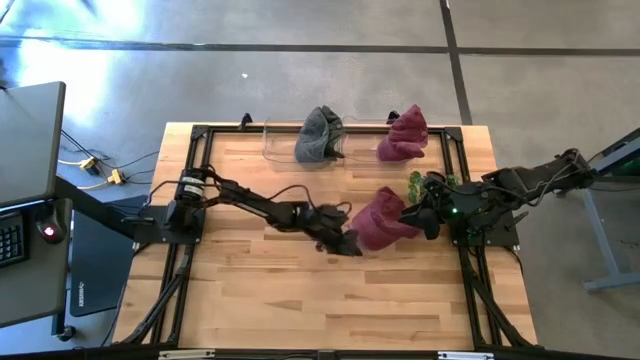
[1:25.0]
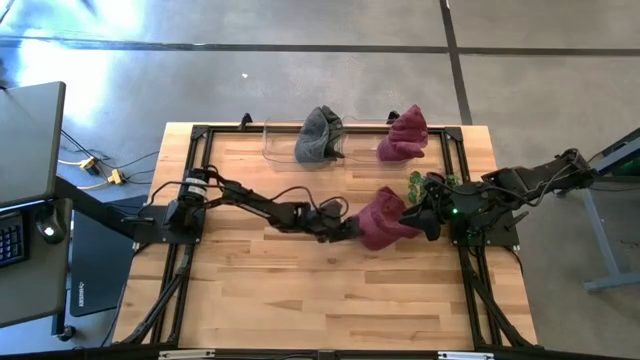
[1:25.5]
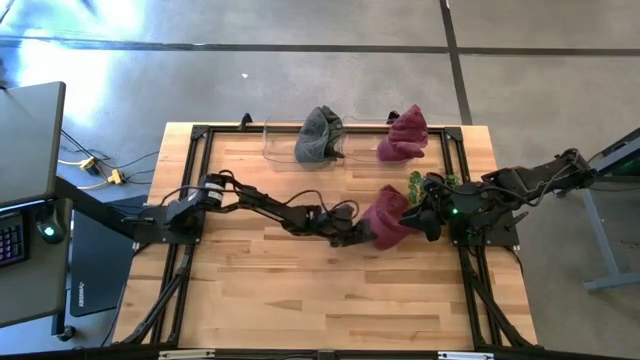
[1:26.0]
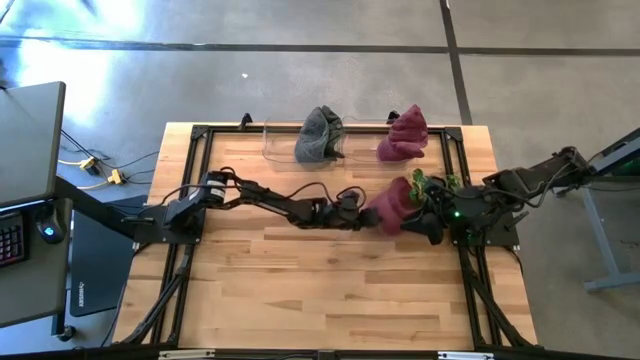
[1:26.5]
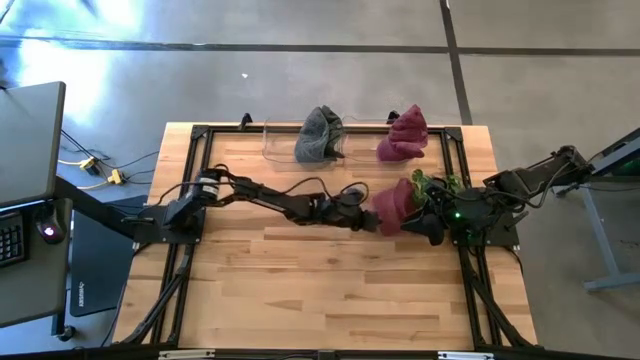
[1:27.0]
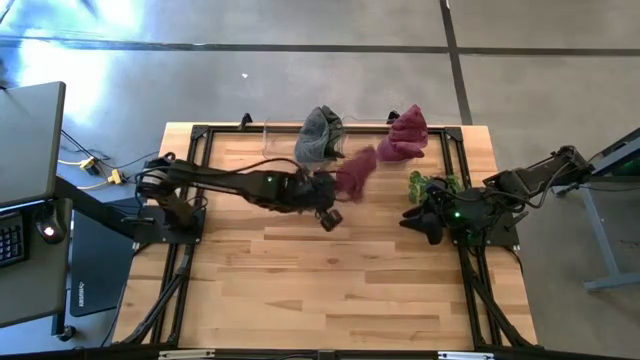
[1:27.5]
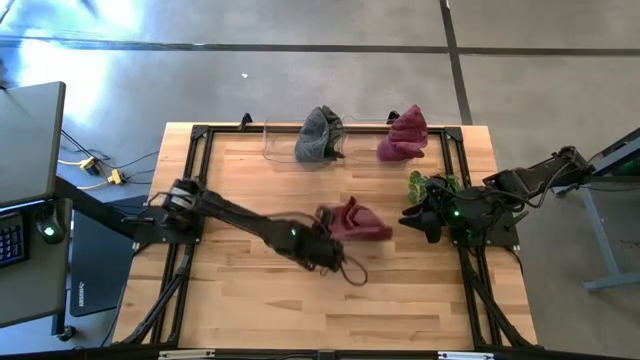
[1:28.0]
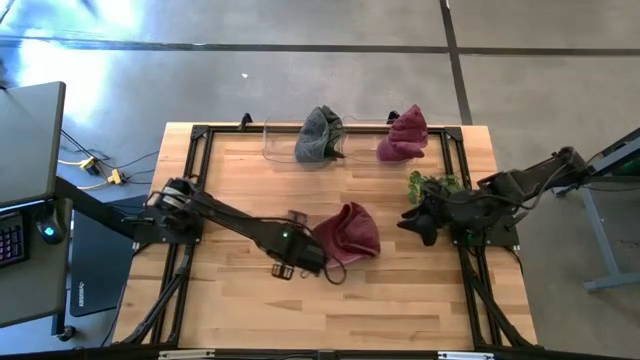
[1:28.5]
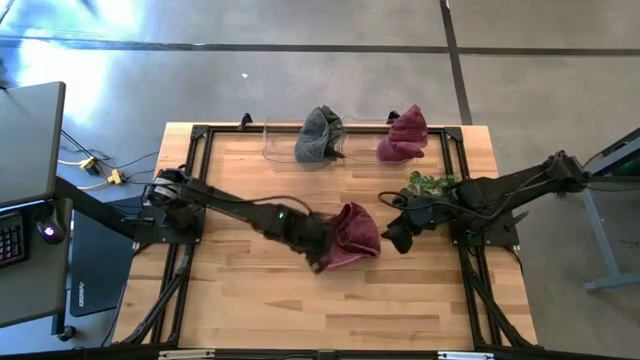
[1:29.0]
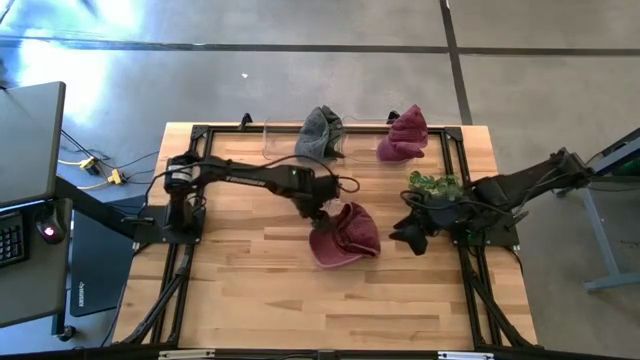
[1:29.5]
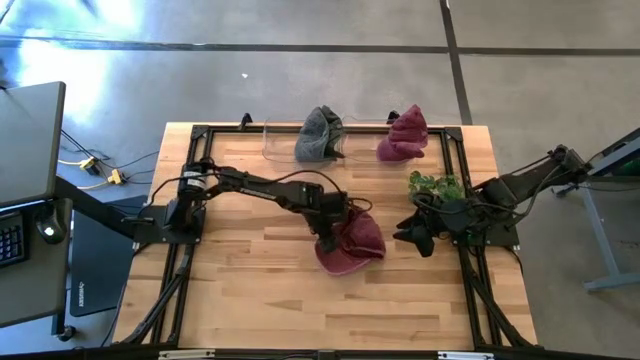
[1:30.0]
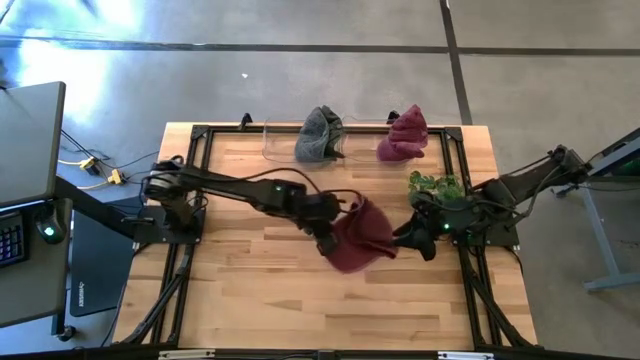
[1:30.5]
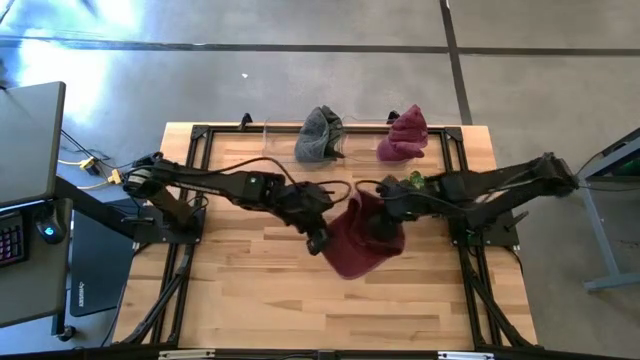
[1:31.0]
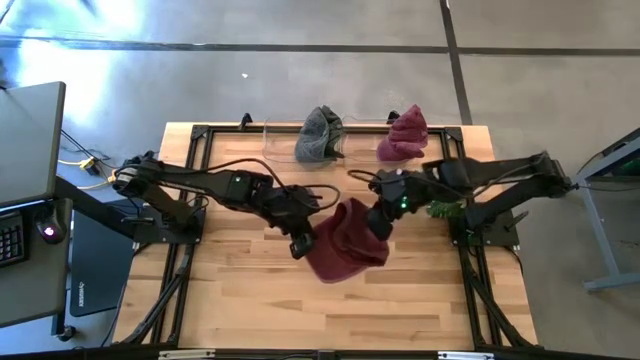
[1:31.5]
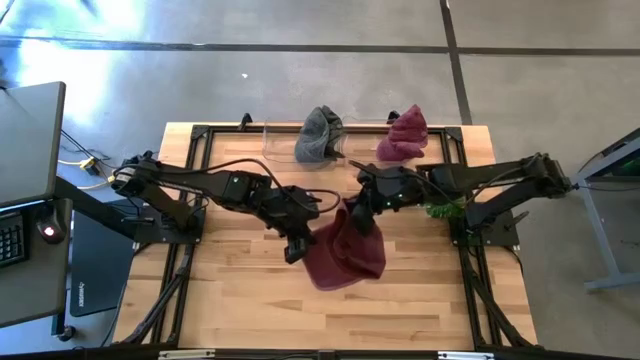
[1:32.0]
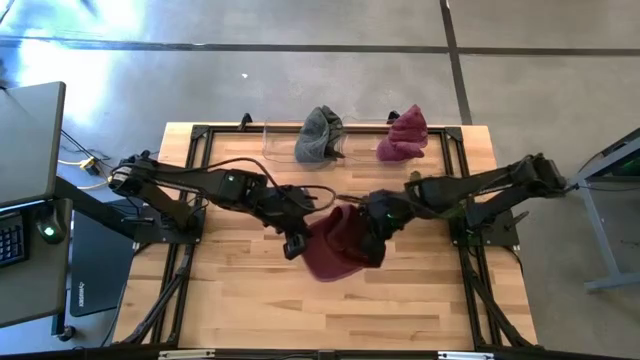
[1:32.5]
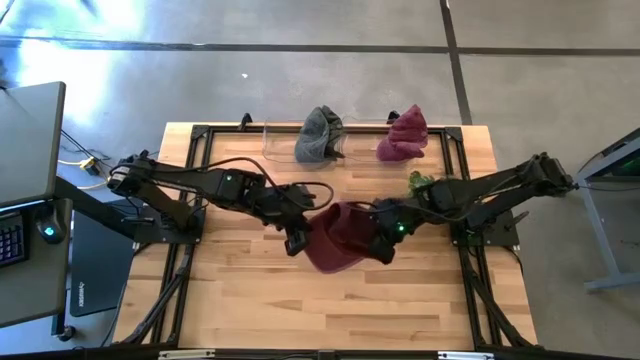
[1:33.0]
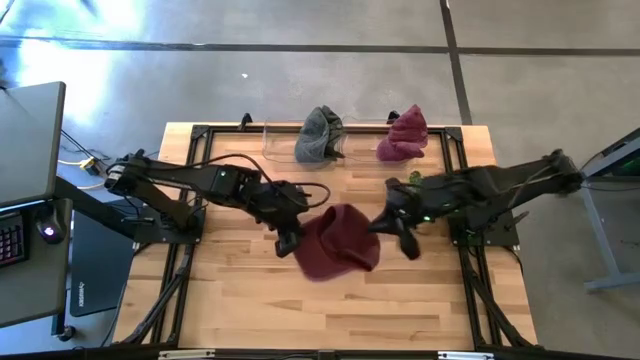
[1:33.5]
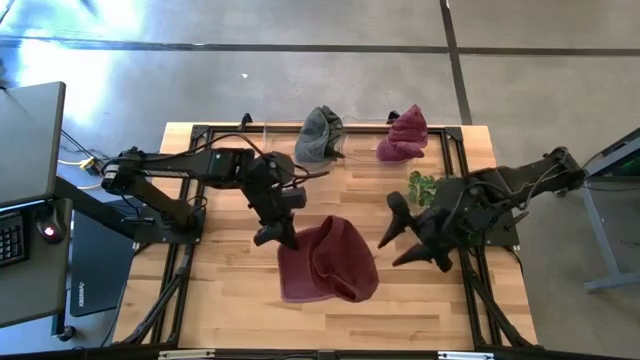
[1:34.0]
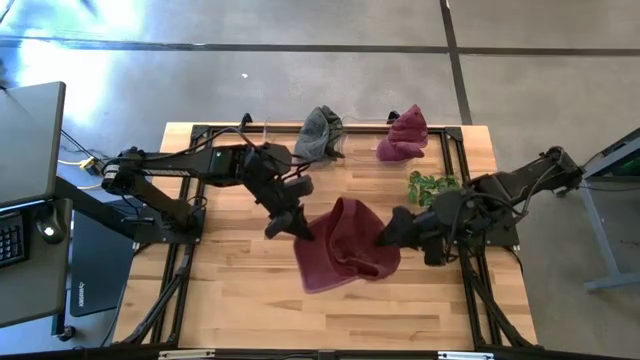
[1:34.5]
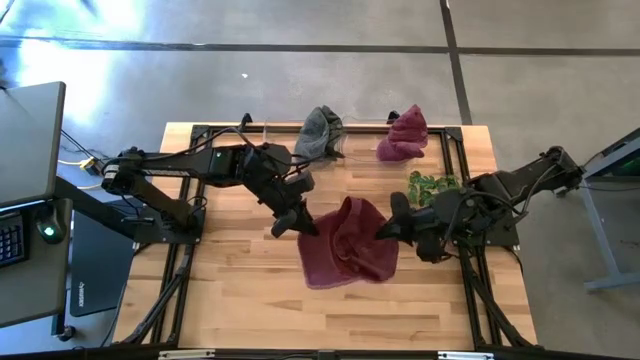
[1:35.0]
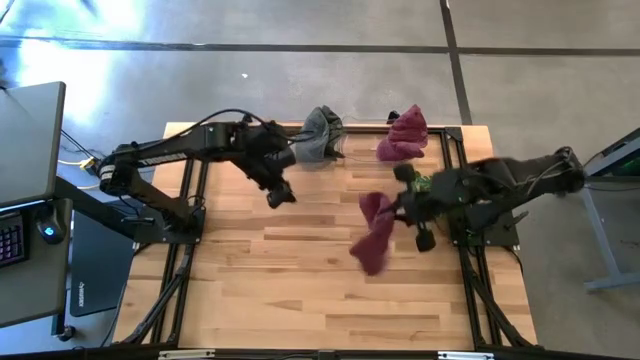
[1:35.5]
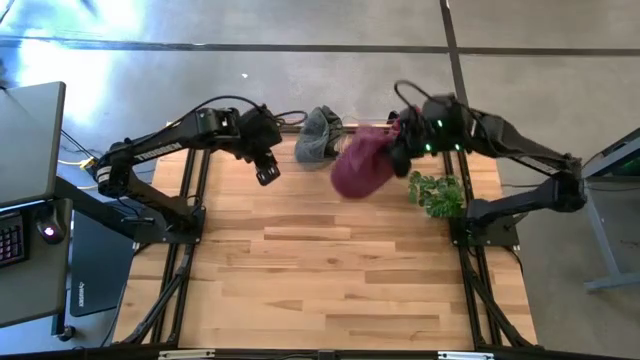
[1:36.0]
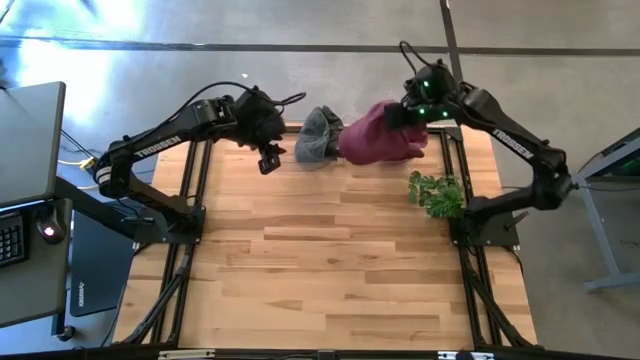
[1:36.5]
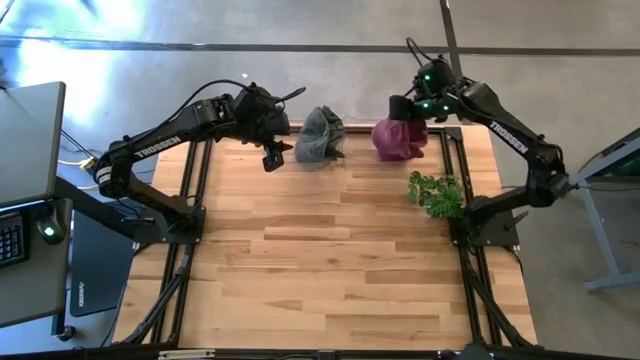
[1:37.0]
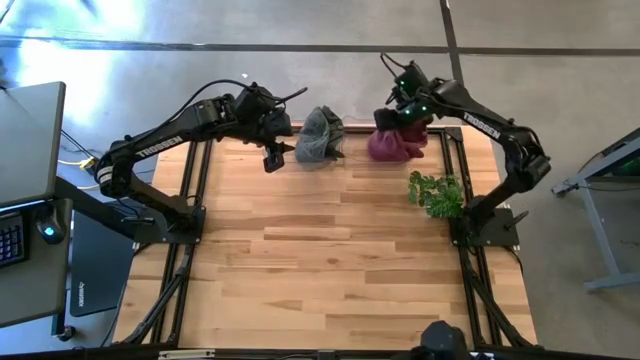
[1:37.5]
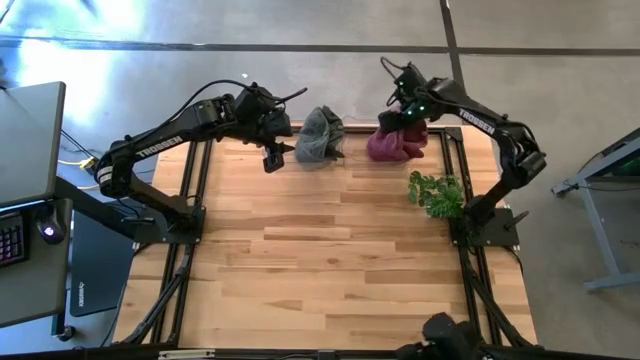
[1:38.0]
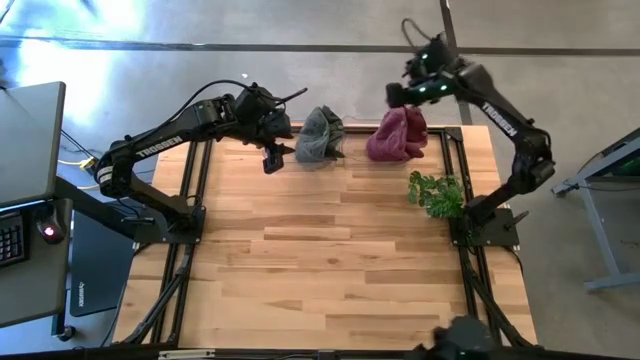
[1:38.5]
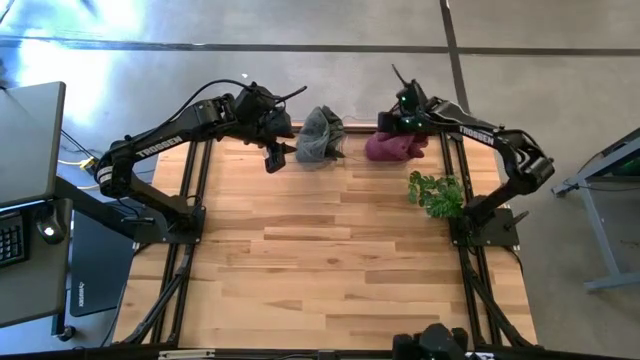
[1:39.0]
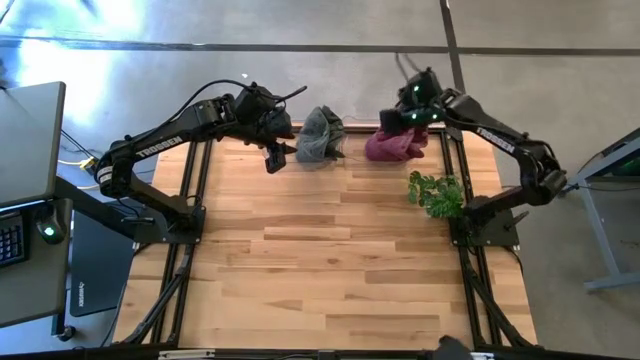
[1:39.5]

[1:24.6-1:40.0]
Task: Pick & Place hat
Put the red cap into the right transparent bin

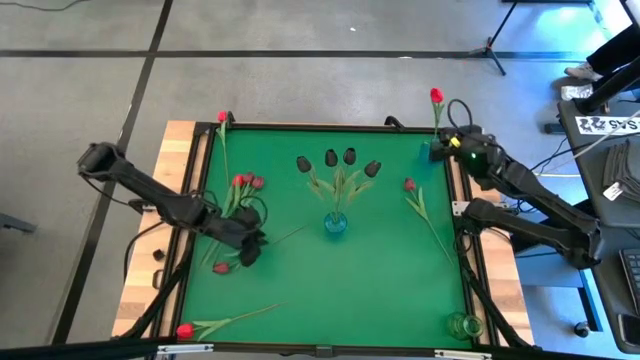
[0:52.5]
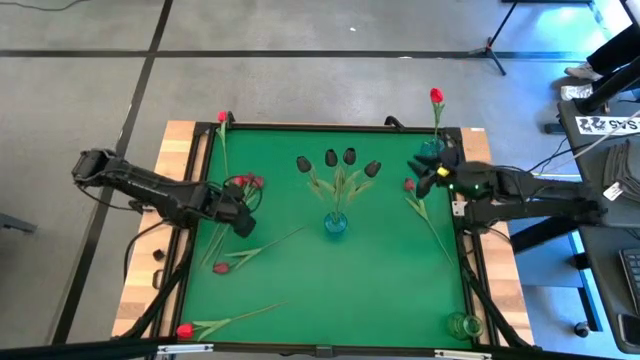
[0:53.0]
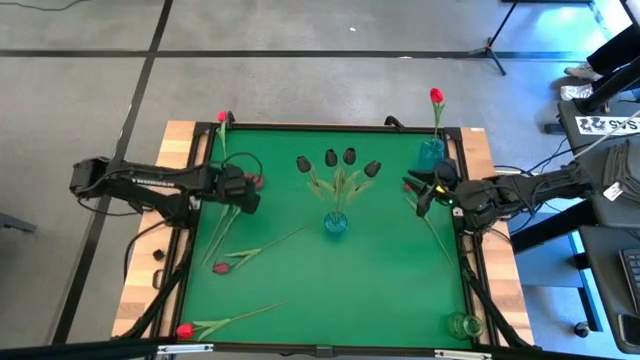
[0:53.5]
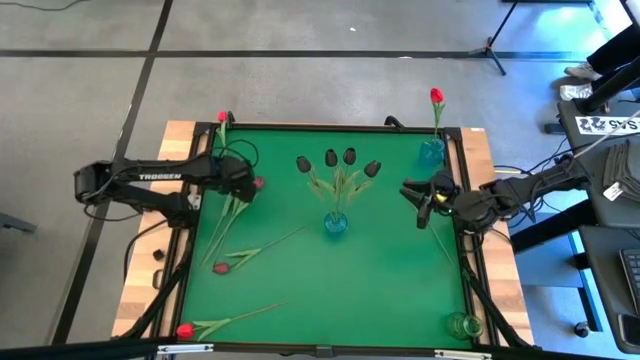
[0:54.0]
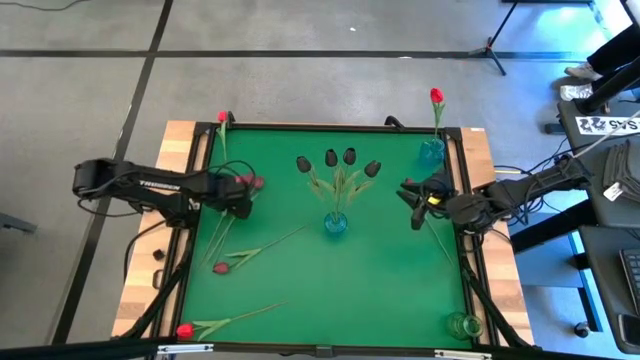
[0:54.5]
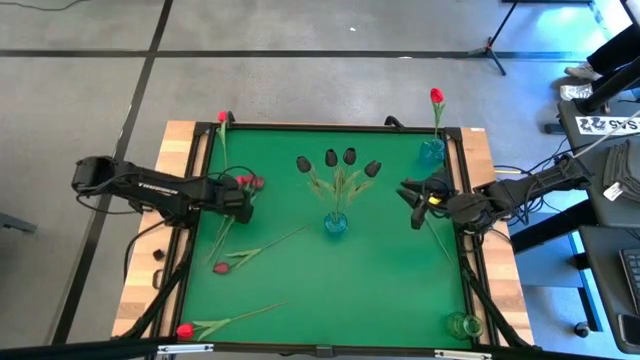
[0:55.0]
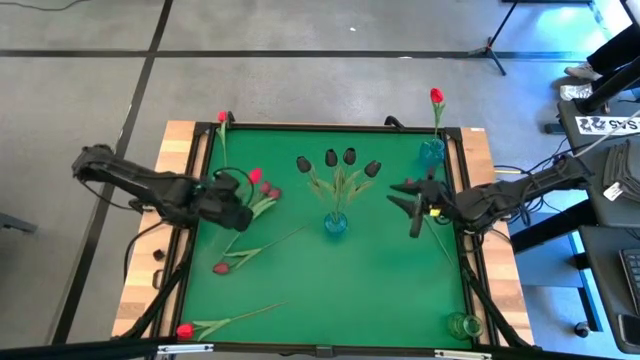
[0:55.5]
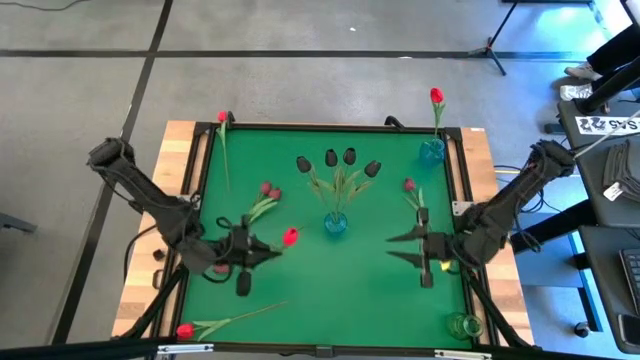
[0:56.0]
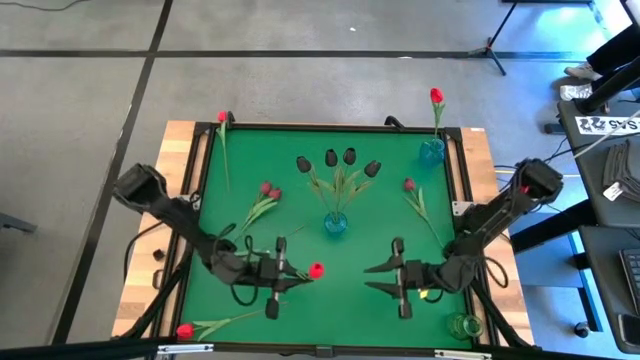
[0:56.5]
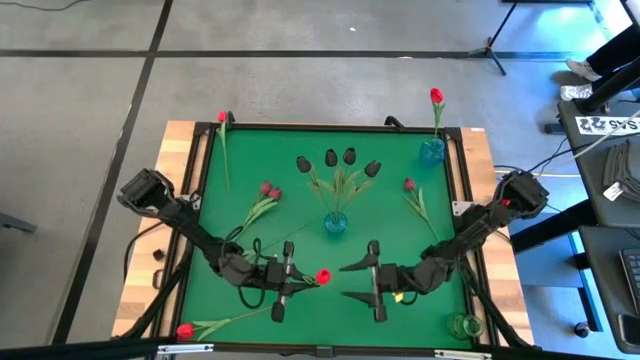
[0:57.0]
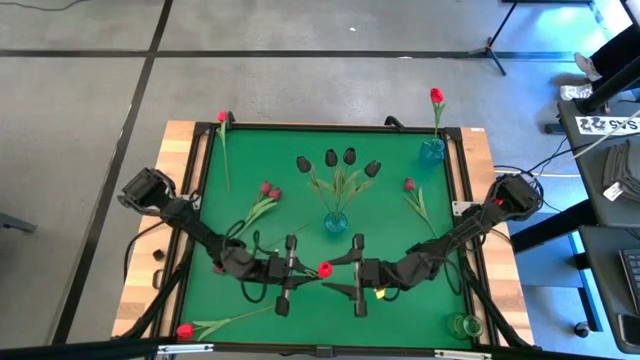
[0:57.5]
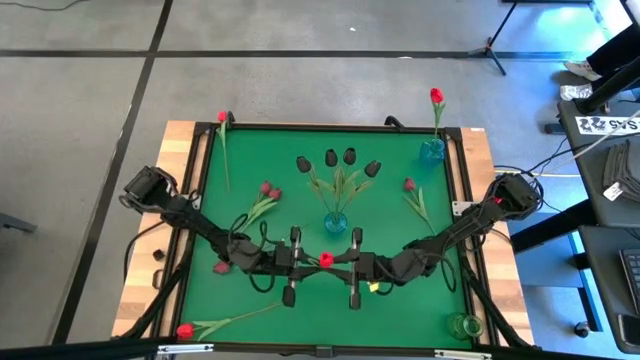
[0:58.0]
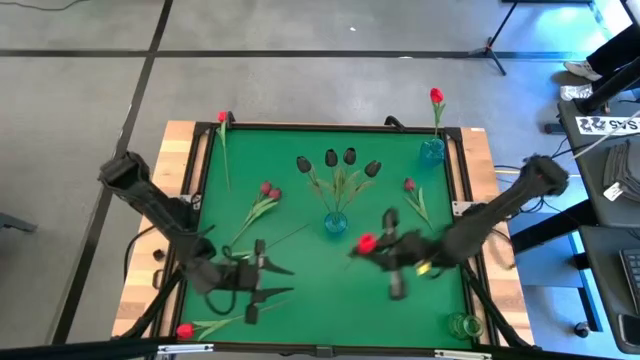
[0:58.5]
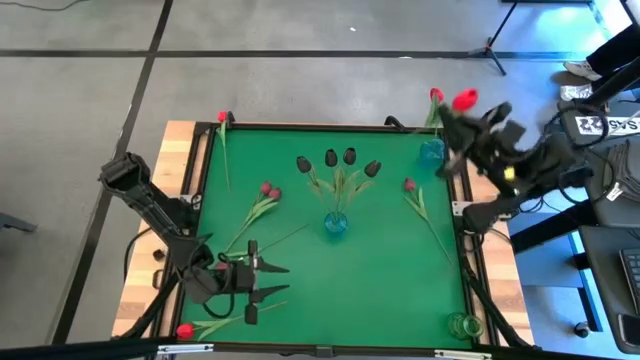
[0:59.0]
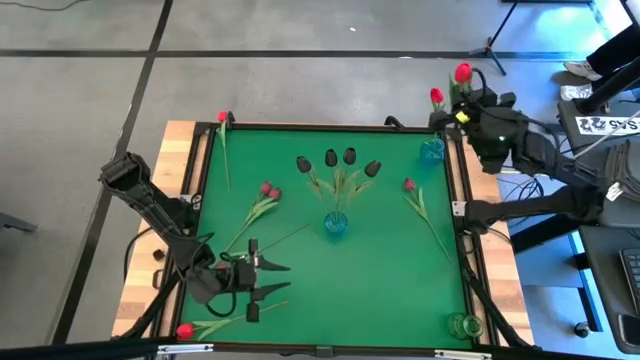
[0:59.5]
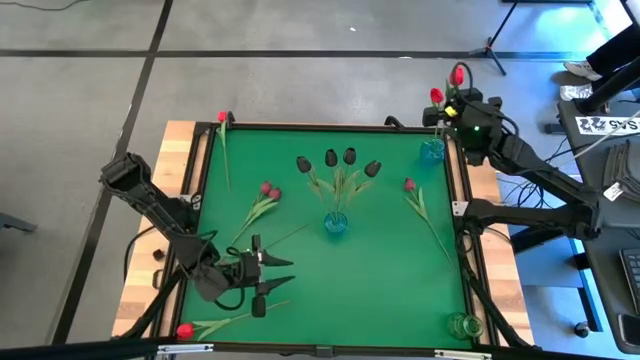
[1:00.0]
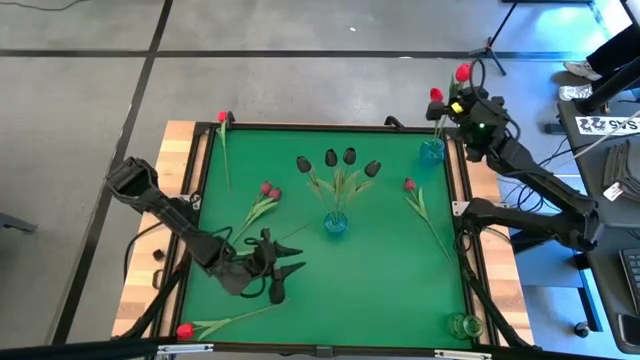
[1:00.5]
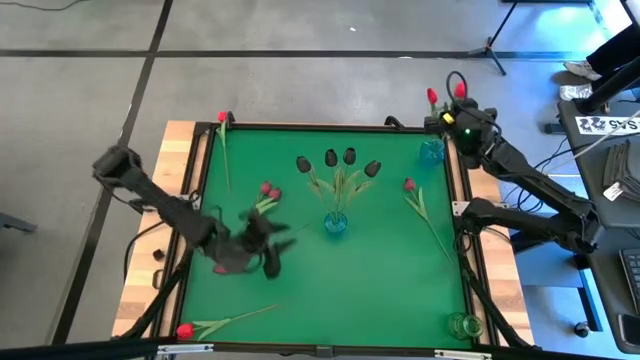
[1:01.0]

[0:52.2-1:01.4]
Task: Sort flowers into vase by color
Put the red tulip into the top blue vase
